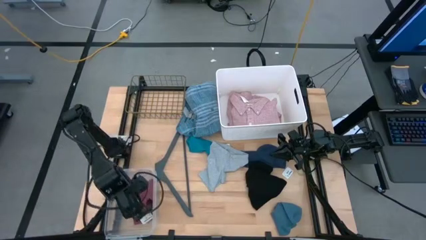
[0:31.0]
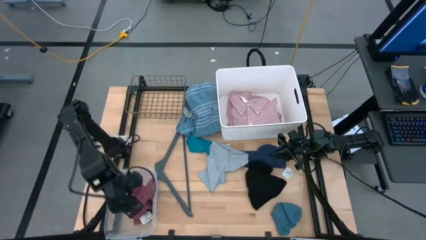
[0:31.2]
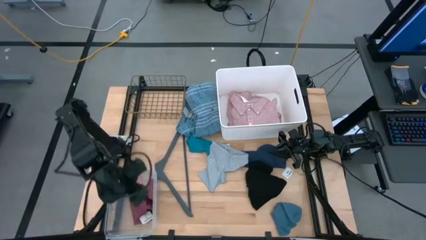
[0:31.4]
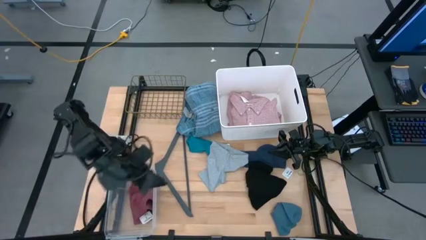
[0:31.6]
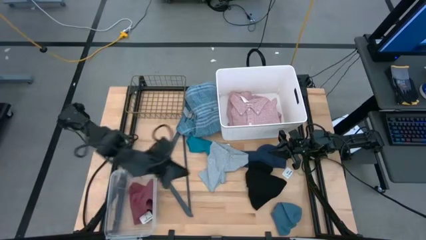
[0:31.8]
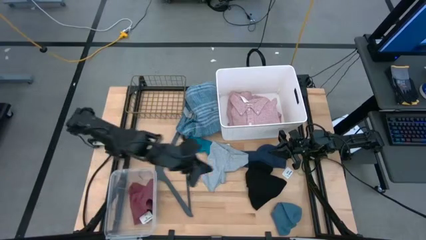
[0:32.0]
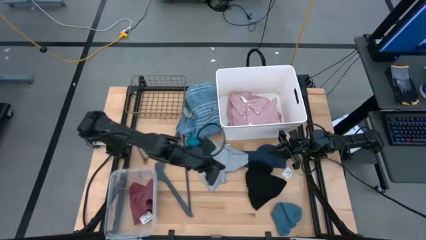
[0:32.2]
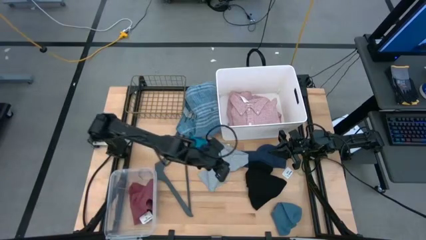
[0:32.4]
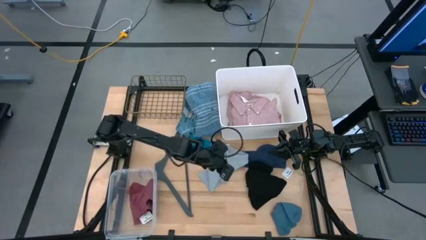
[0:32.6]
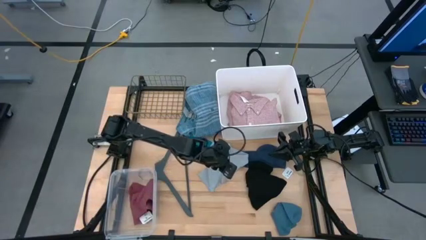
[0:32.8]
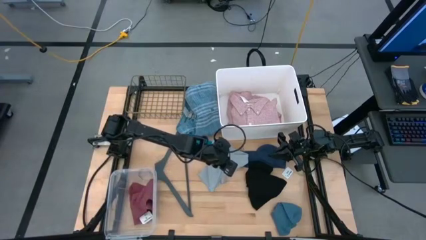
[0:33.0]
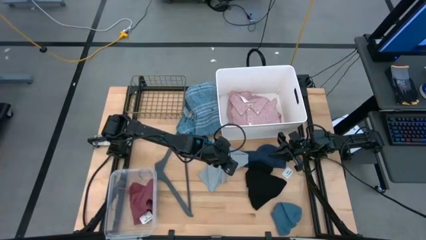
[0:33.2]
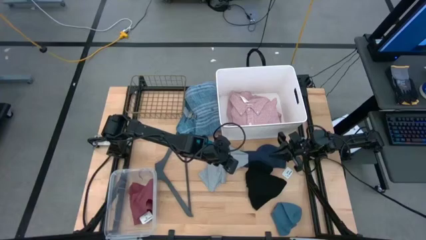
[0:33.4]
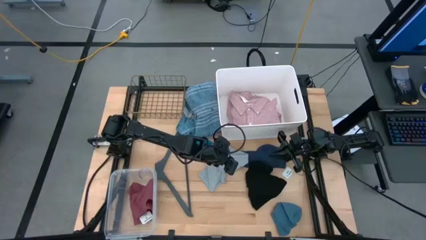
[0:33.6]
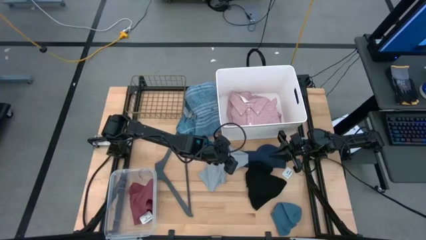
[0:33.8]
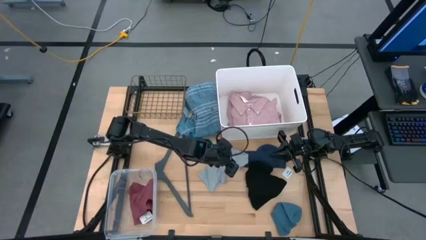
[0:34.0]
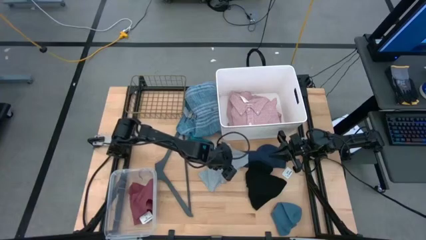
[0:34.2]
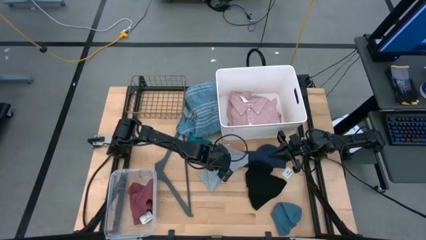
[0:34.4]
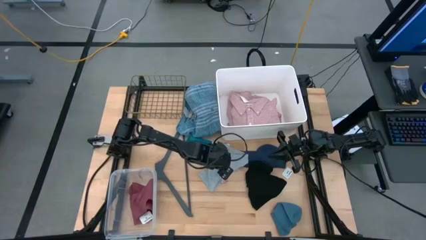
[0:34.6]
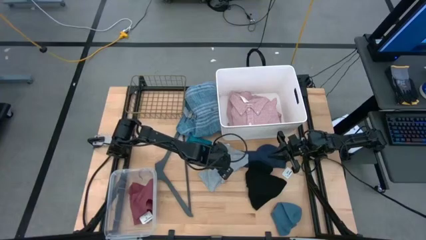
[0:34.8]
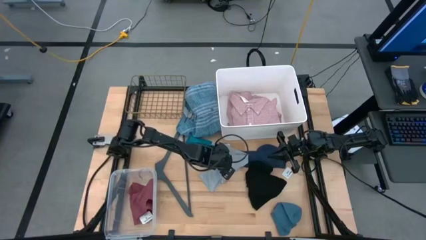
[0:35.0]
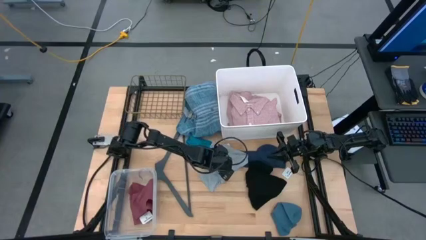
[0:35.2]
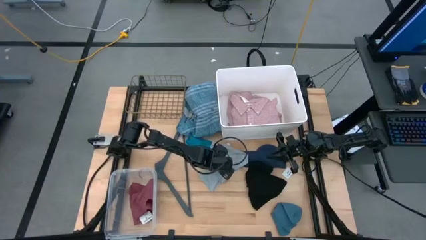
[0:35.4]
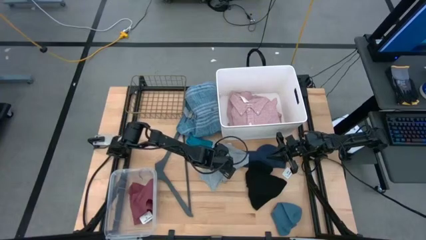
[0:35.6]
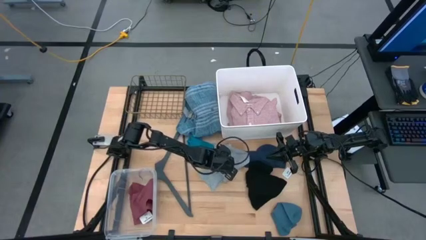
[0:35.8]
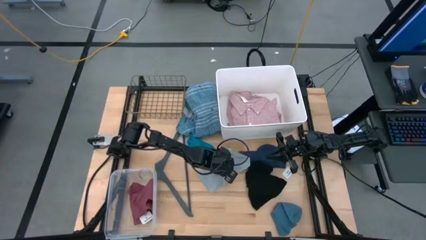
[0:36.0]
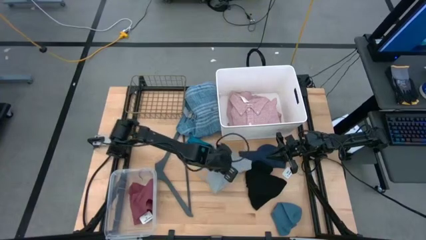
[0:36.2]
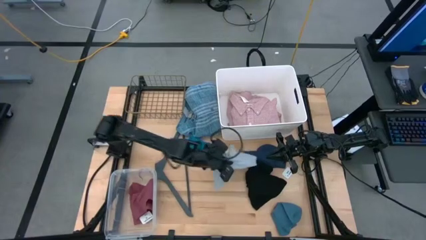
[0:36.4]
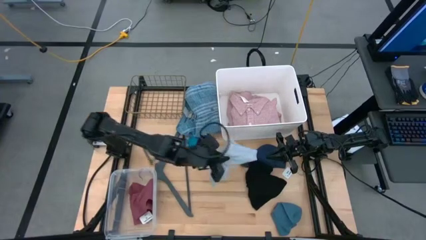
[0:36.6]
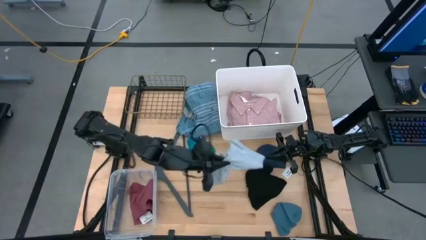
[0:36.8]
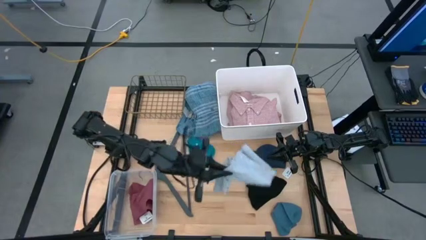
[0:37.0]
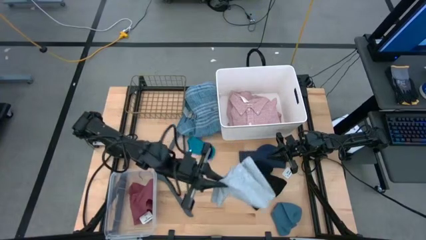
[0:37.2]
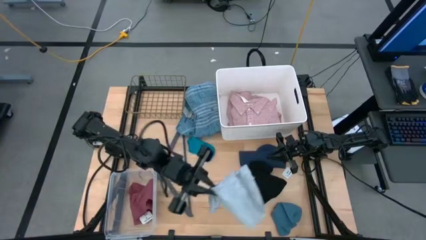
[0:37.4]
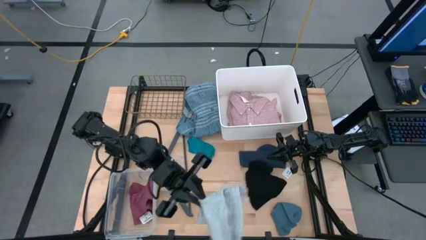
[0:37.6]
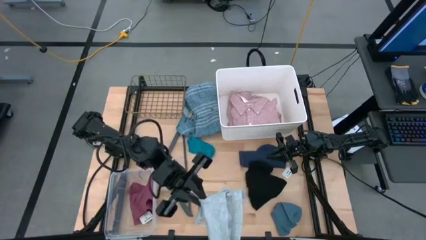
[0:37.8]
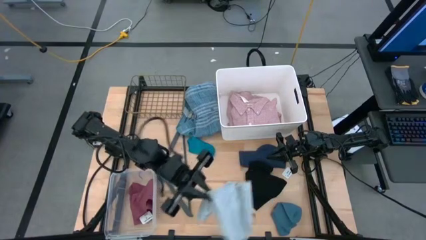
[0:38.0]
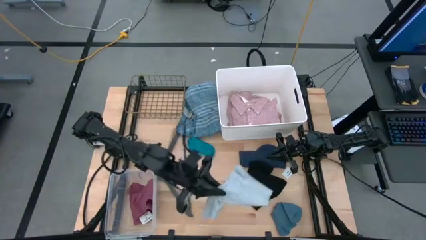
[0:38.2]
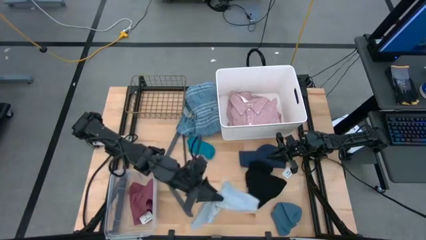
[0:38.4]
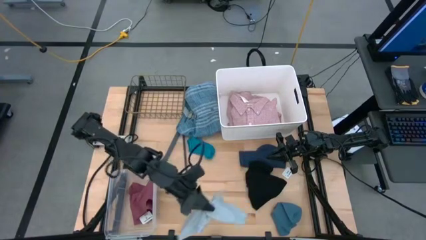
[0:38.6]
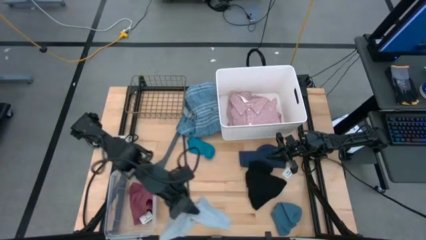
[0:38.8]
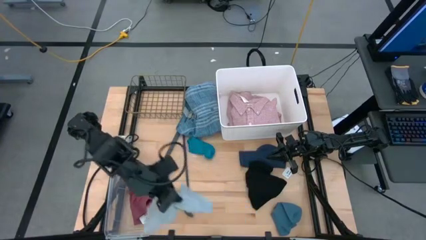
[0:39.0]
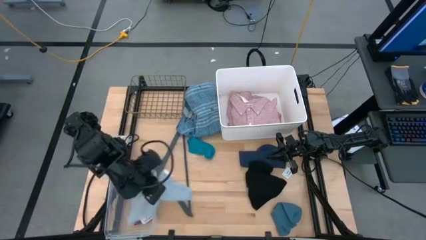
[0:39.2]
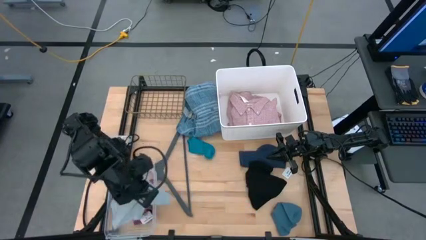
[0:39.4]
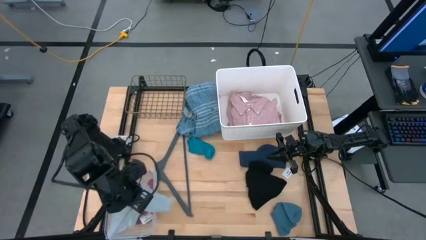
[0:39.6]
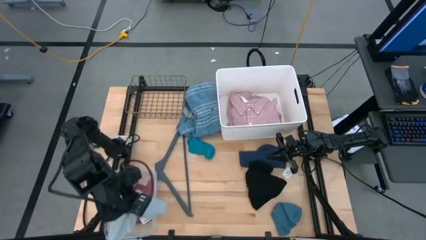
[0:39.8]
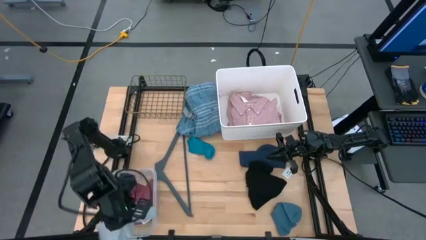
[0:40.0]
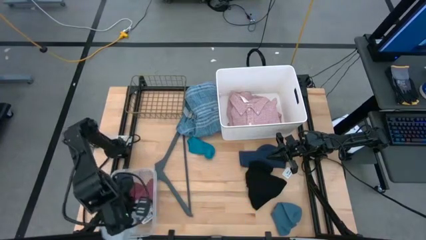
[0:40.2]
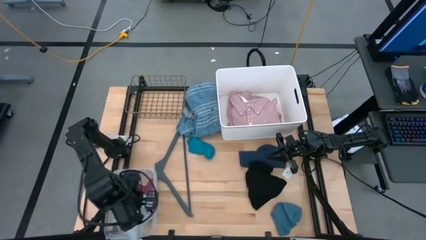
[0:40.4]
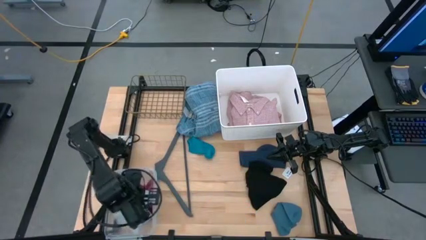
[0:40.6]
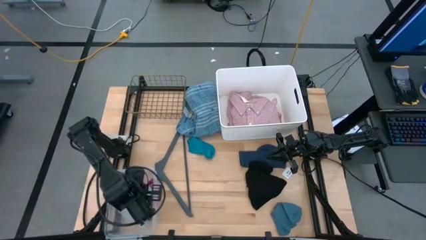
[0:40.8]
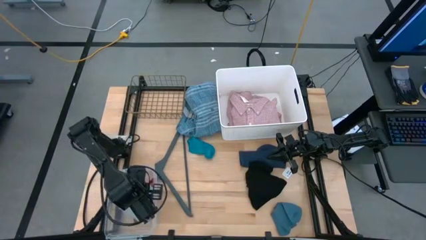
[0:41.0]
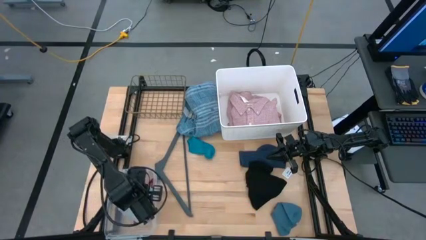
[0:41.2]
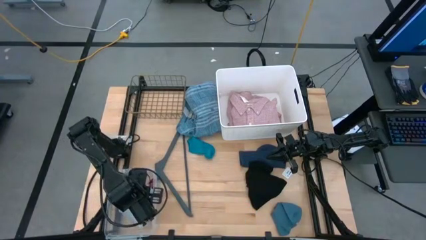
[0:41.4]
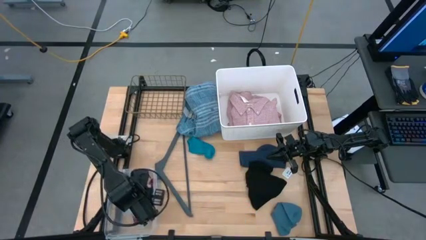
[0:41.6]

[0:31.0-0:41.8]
Task: Pick & Place Cloths
Put the gray boxers into the transparent bin

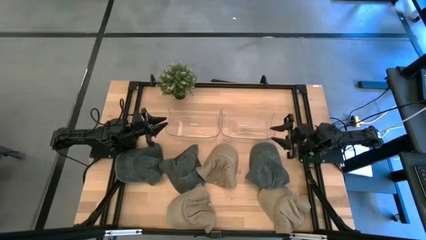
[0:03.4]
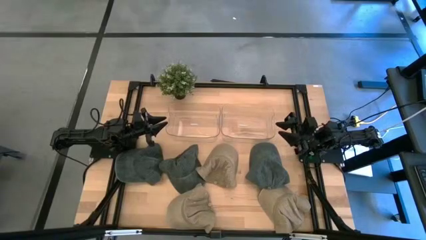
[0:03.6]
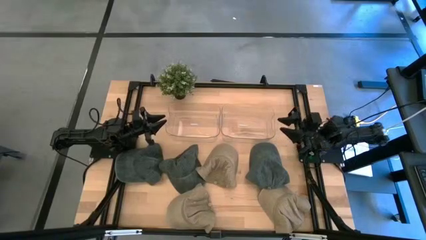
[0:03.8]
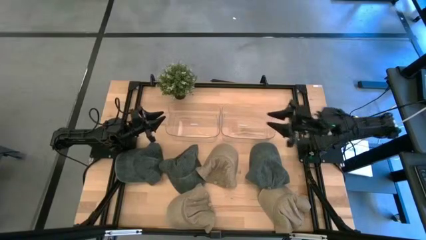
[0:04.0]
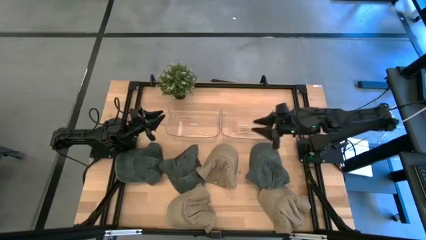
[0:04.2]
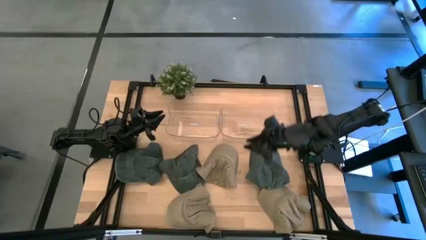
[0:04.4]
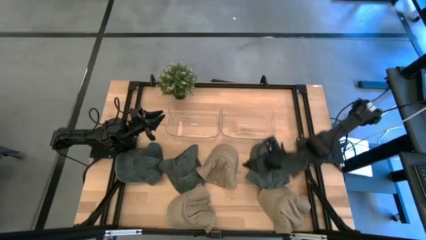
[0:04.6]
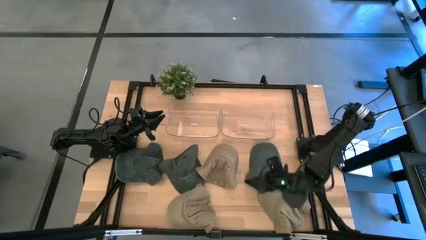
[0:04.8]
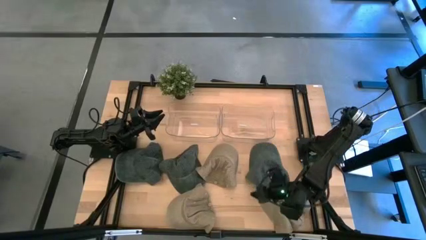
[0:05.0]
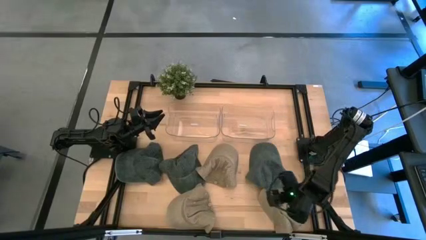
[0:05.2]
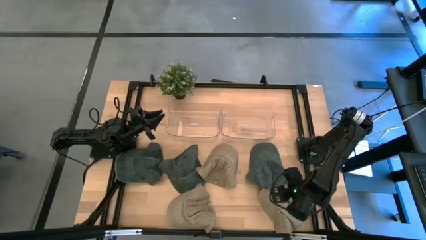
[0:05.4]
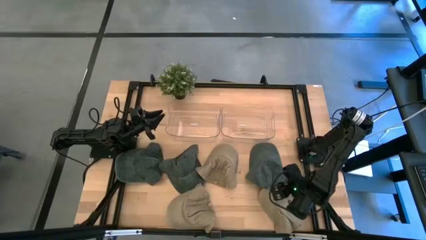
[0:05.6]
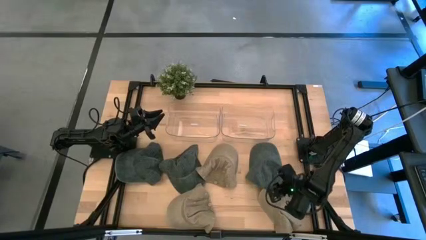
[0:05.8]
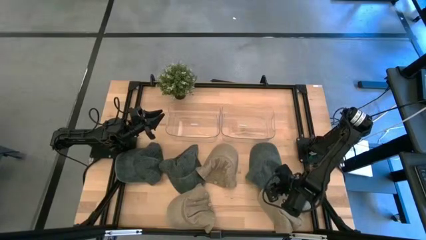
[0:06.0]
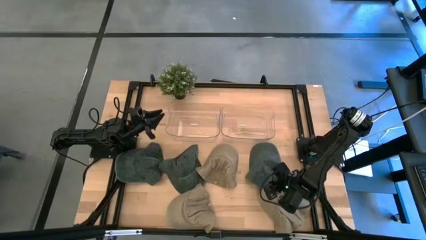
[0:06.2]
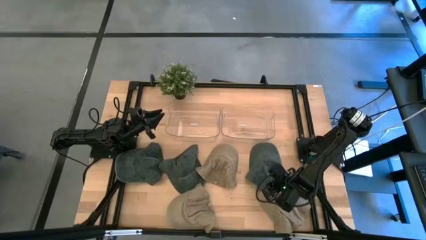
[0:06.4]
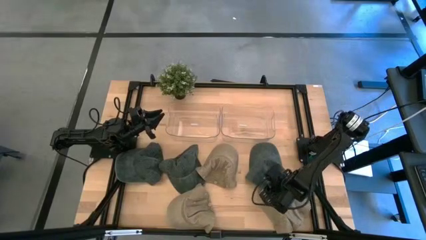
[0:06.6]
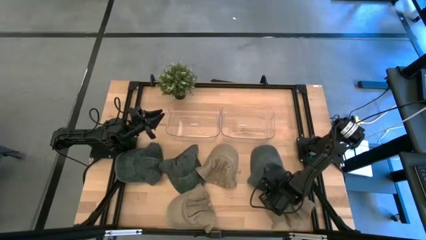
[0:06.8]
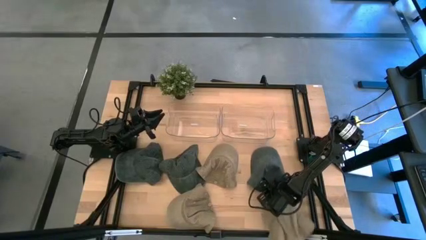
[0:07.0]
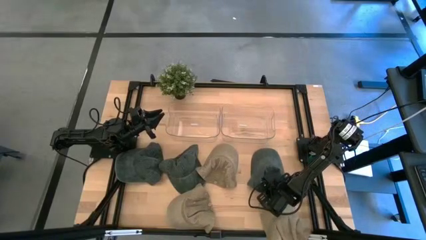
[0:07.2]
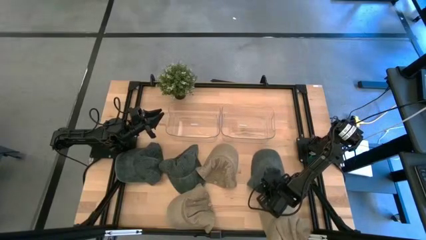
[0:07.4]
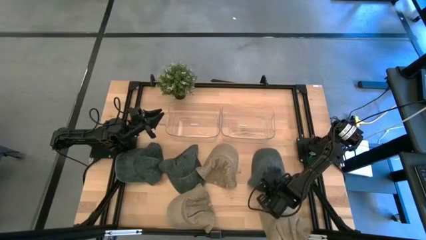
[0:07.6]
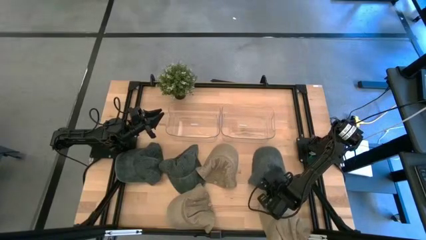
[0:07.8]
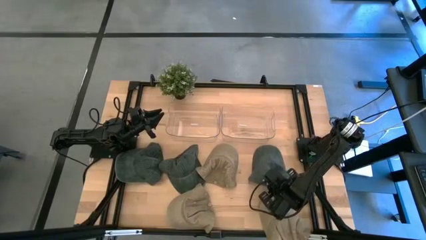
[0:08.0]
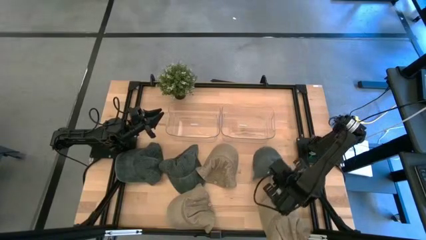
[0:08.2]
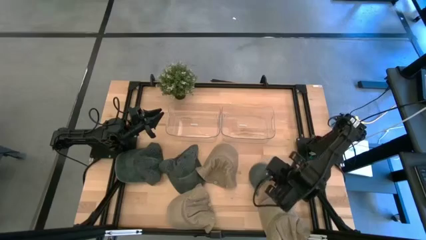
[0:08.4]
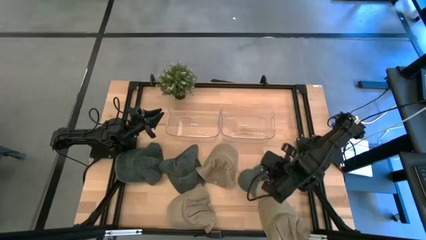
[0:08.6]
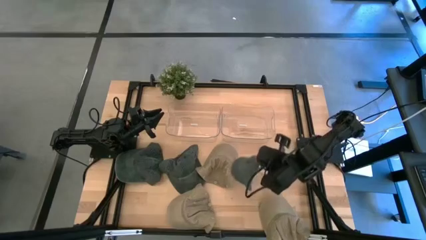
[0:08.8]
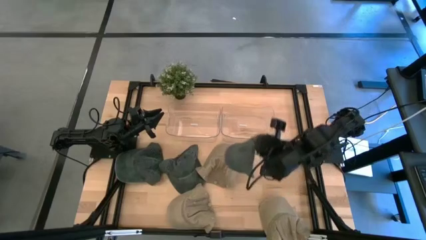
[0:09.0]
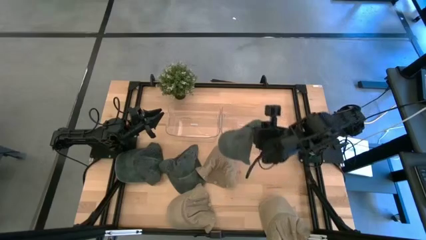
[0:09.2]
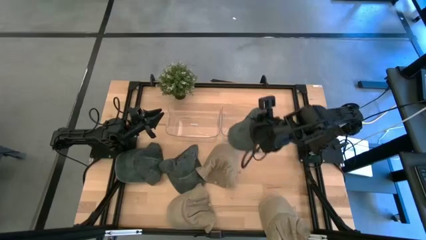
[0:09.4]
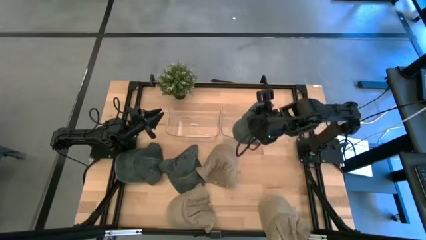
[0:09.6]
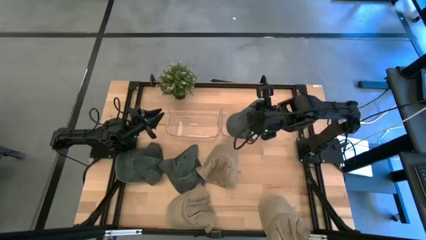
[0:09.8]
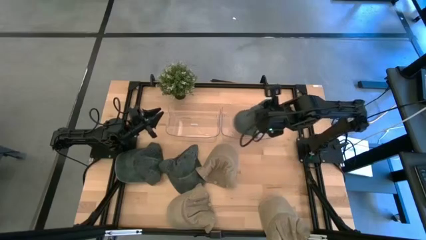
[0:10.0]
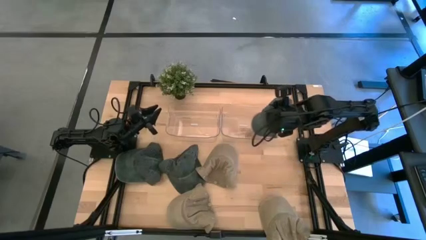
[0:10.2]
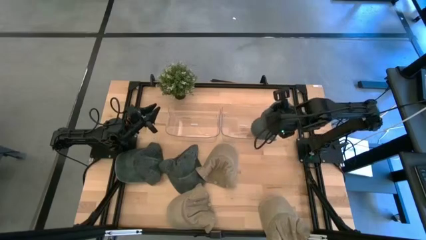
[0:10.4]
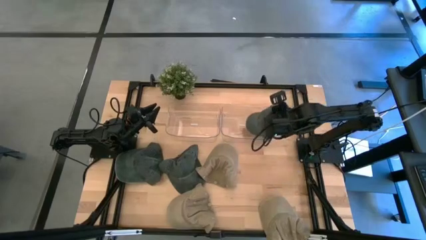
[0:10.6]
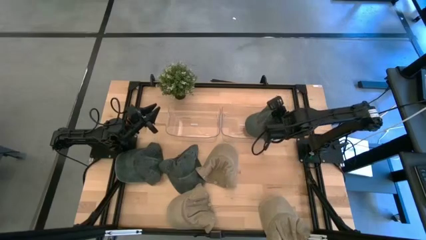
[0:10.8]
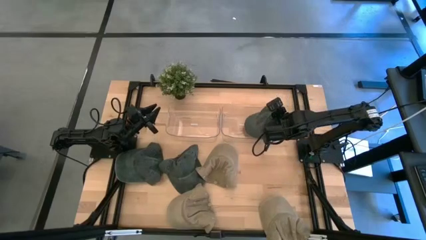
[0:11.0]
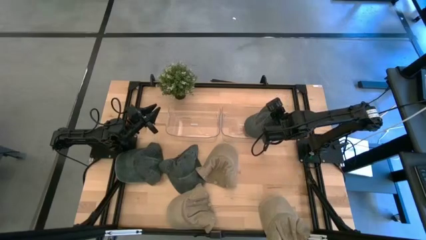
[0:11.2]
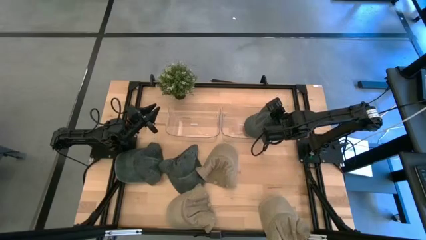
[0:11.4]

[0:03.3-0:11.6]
Task: Pick & Place hat
Put the right black cap into the right transparent bin
